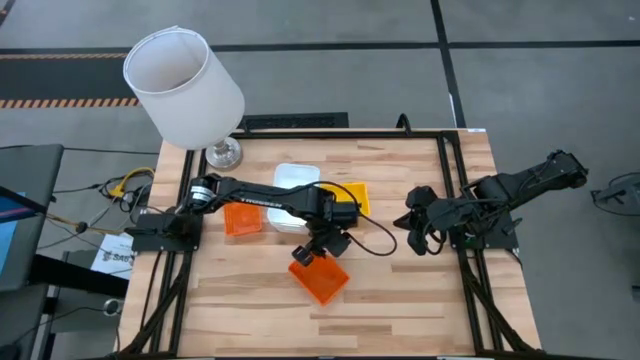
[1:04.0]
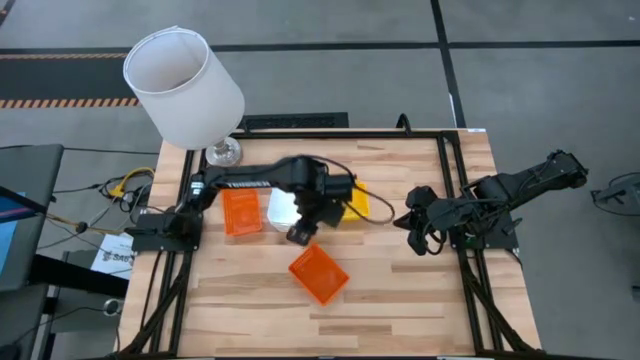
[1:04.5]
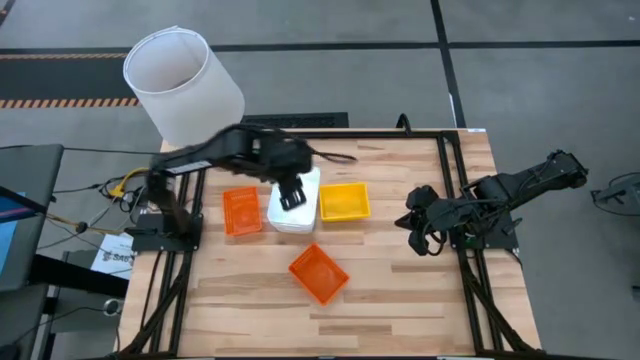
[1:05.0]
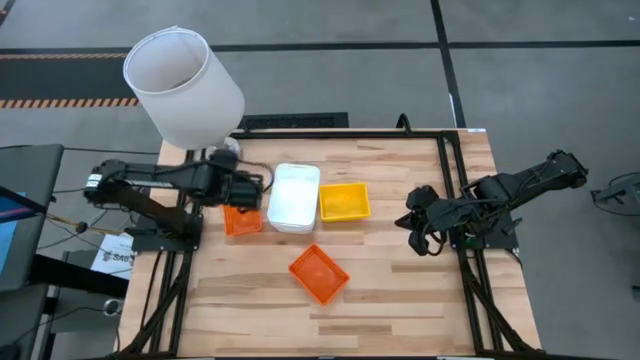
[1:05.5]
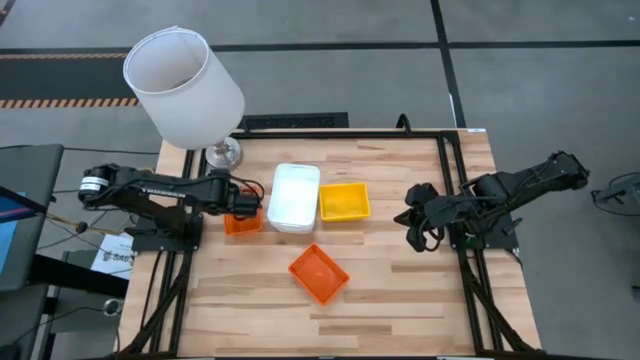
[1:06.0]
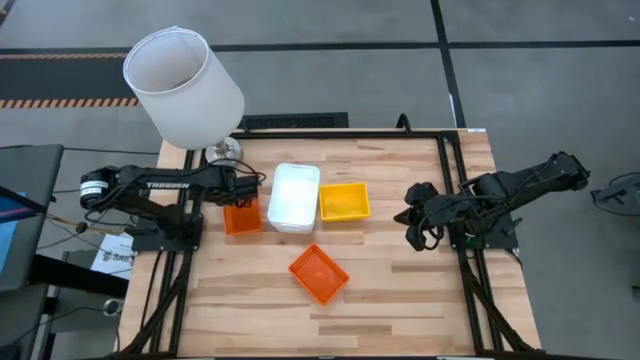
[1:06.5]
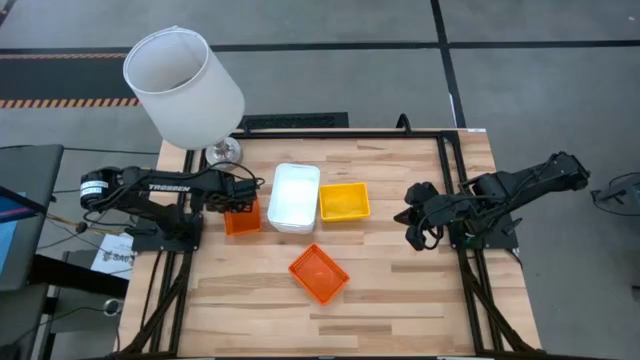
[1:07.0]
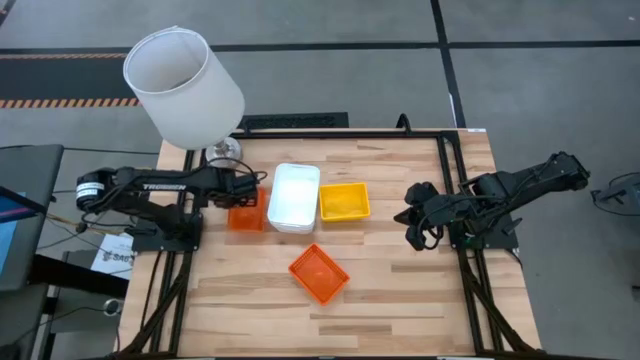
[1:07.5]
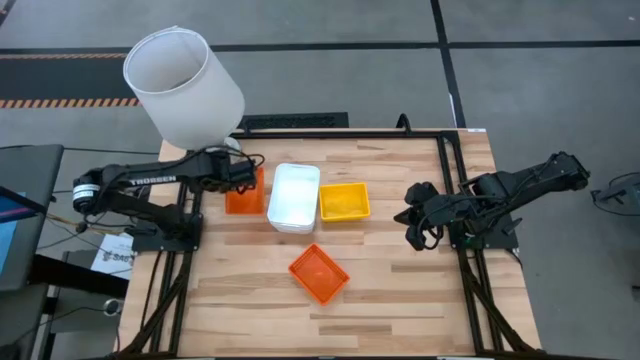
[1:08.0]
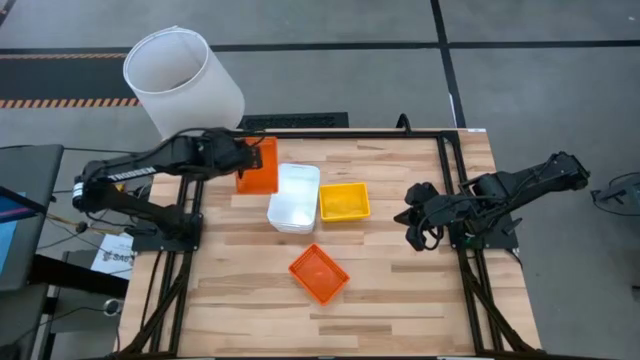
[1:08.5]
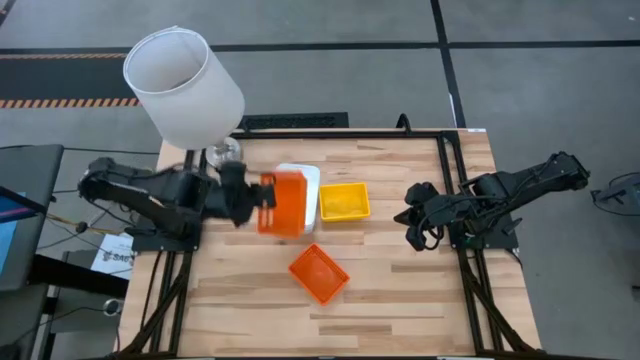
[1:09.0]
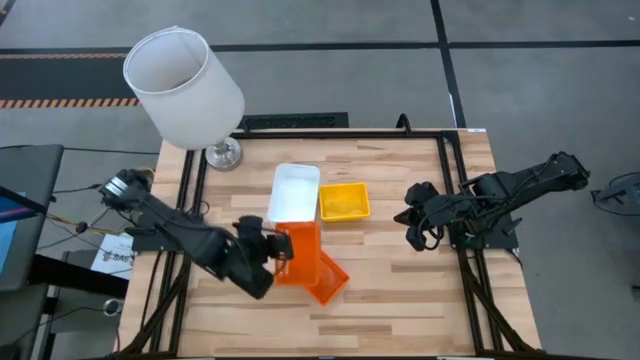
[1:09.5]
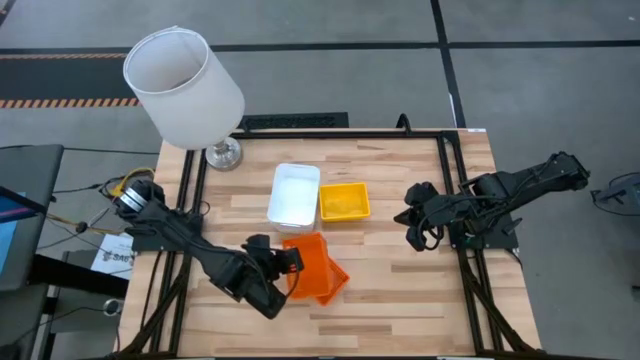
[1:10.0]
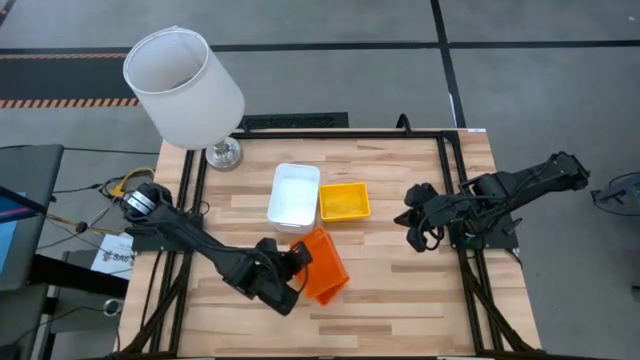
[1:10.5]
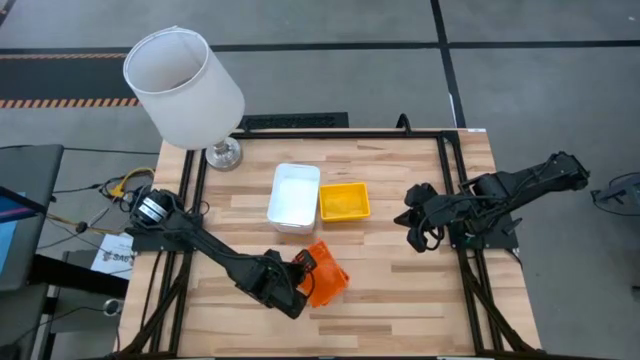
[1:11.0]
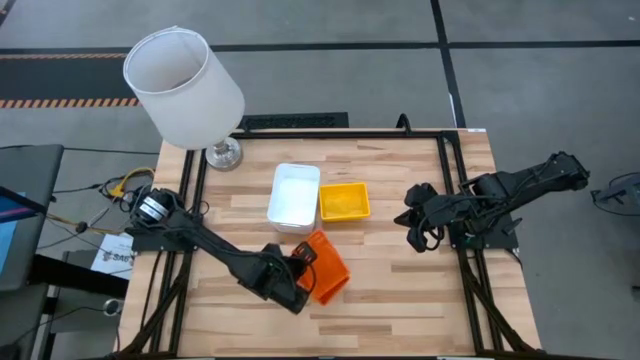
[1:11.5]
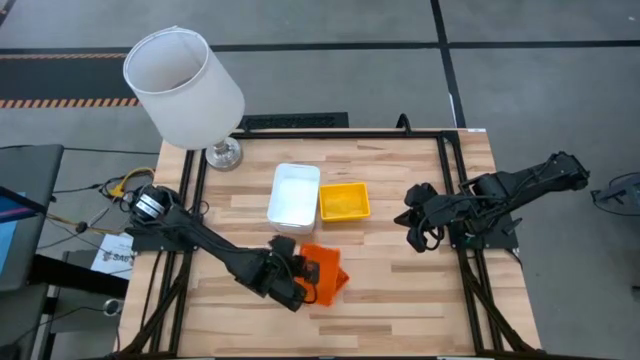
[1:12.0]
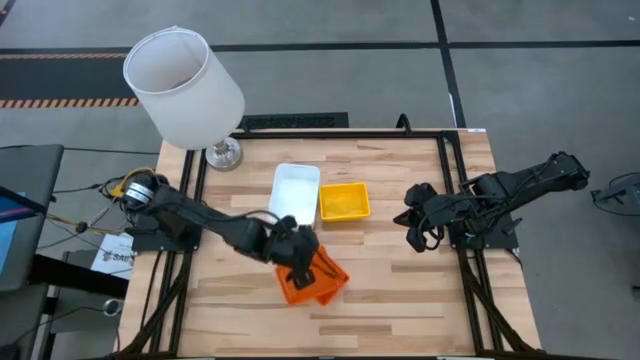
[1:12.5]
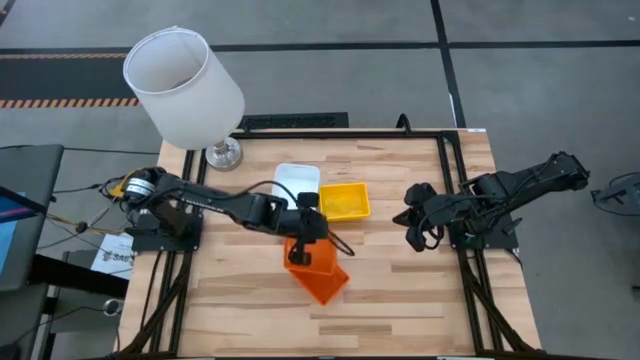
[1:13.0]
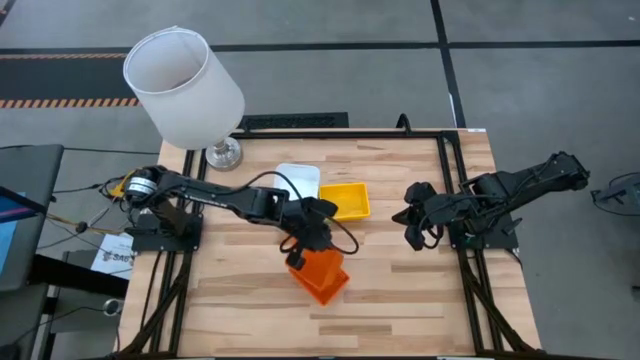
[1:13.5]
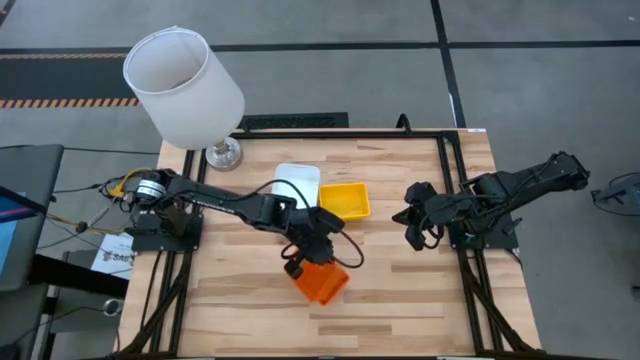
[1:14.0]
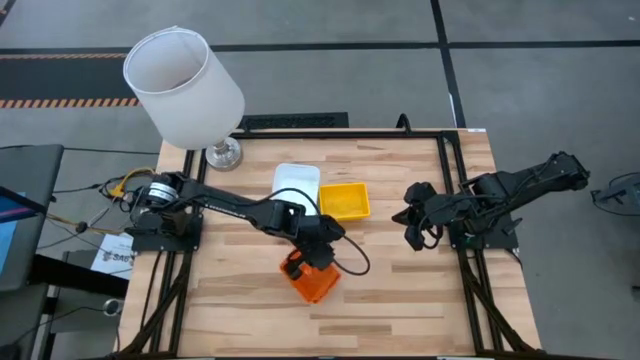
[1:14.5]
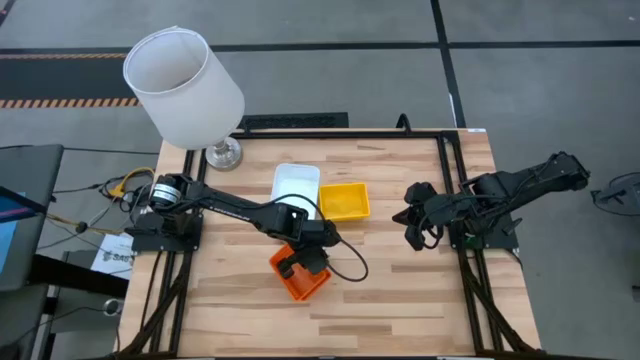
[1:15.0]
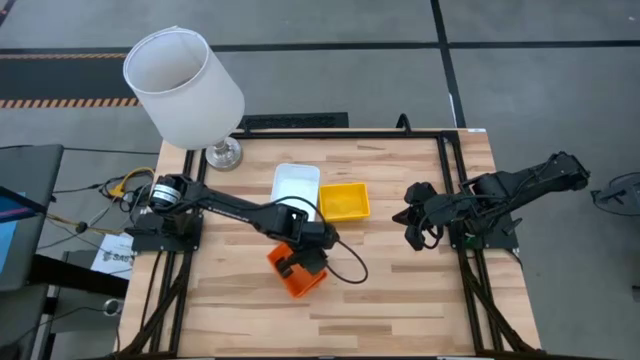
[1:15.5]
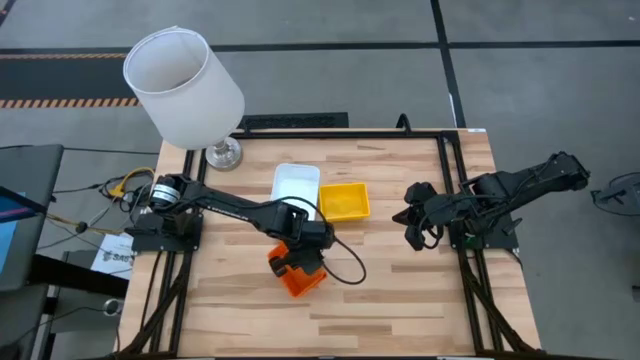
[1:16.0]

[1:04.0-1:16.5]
Stack the top orange bin on top of the bottom orange bin

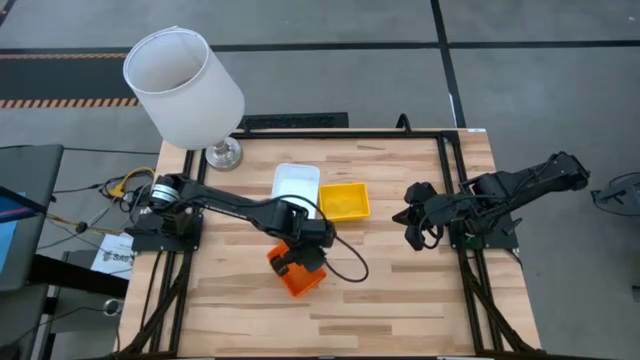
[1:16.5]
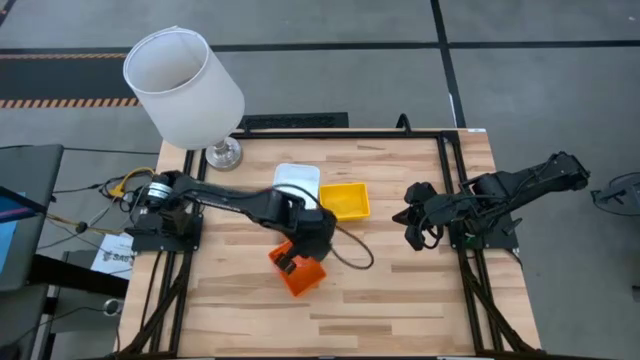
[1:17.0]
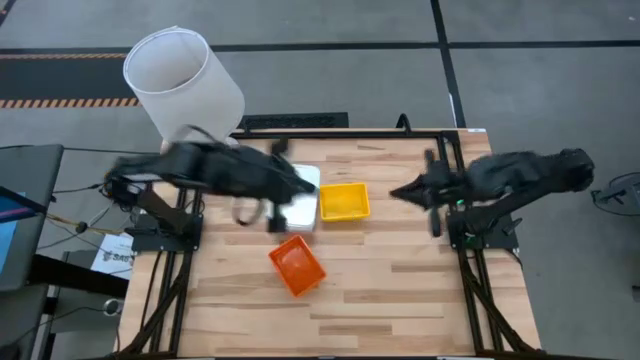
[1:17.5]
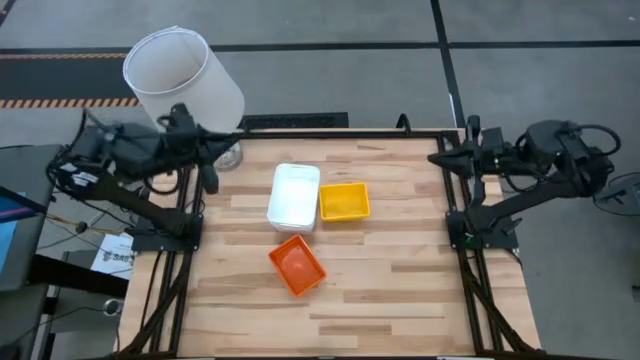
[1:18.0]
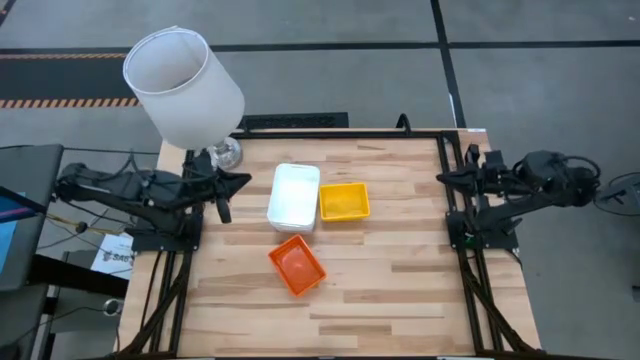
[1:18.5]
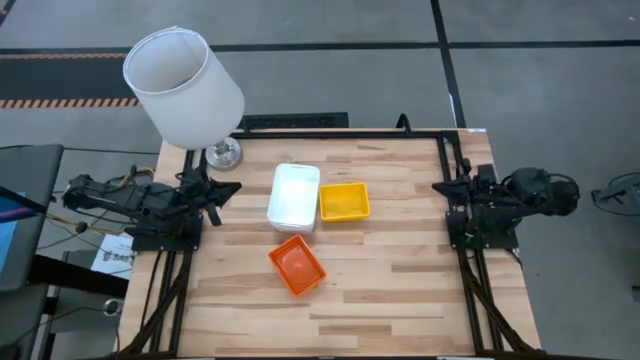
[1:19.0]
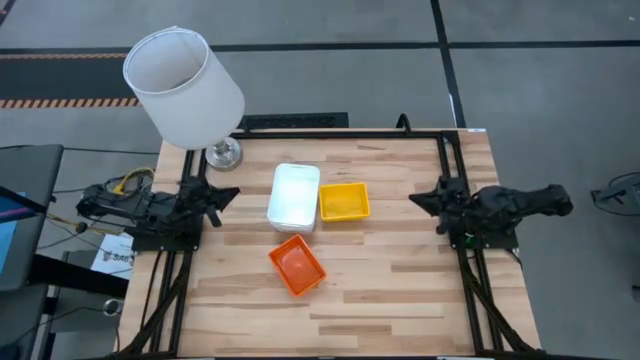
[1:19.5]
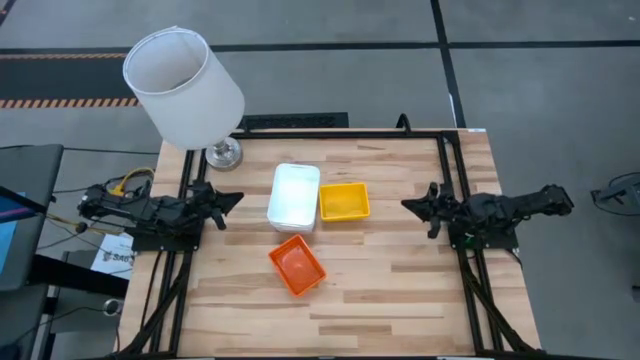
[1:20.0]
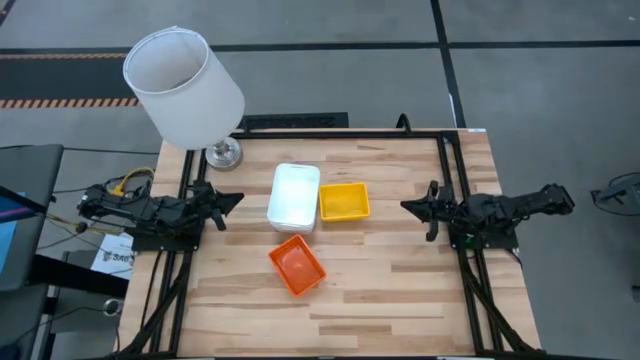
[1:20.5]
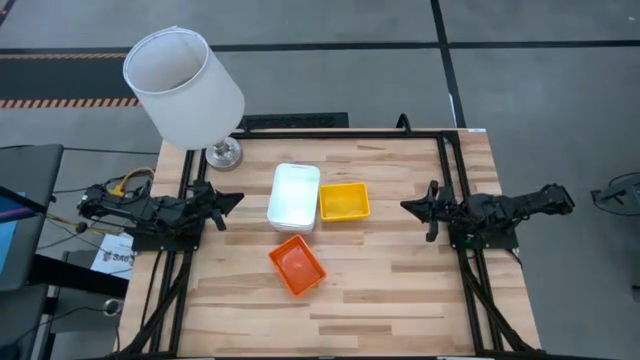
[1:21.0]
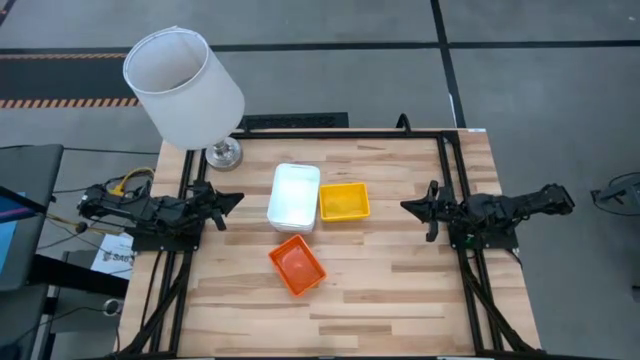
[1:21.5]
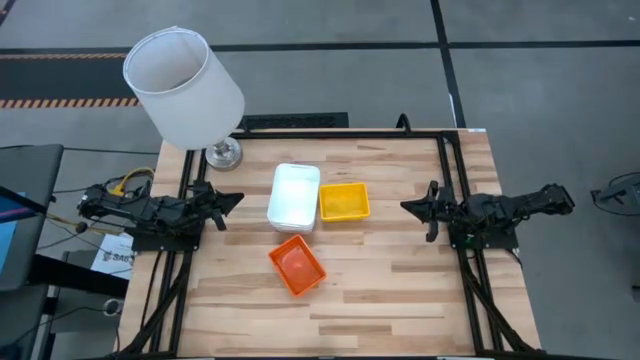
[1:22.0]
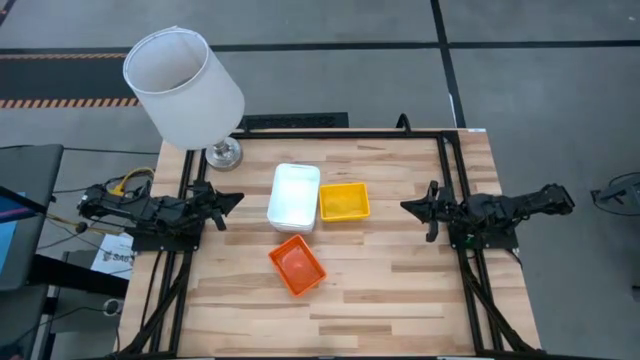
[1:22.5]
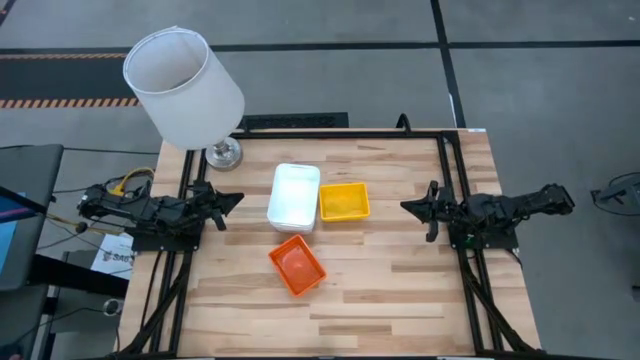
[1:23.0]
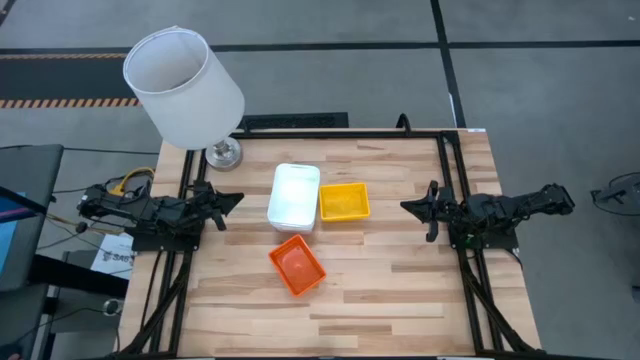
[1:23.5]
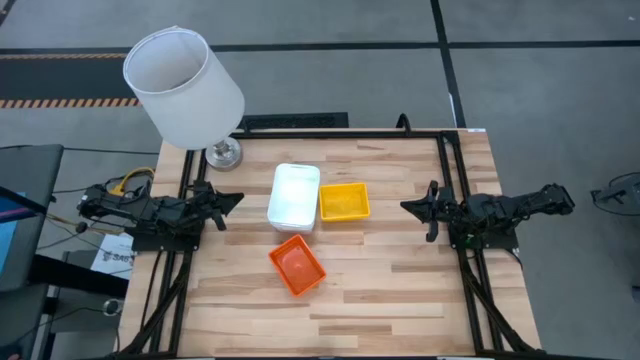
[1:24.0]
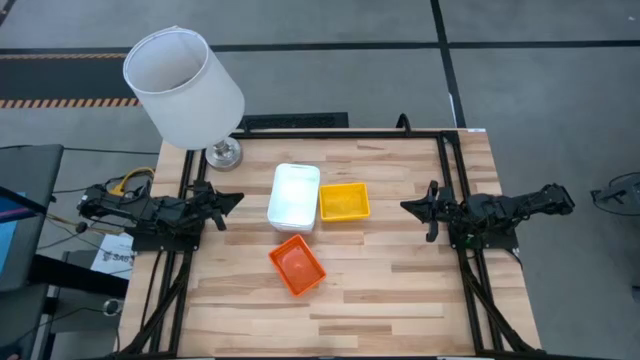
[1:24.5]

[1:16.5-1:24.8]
Return to Home Position
